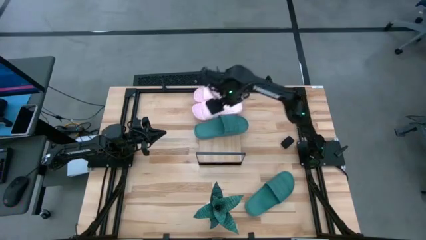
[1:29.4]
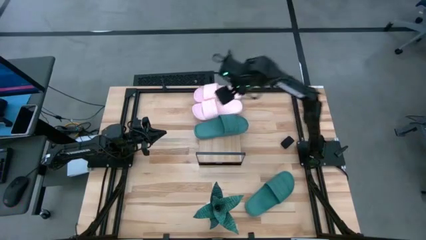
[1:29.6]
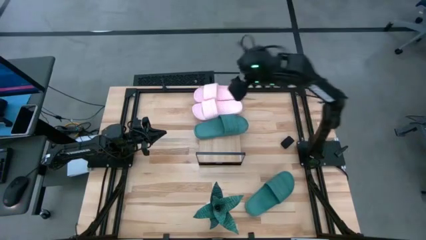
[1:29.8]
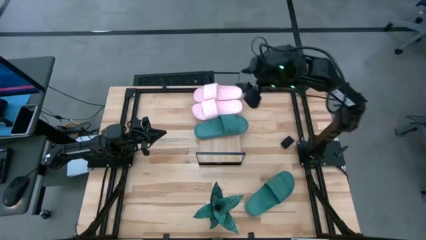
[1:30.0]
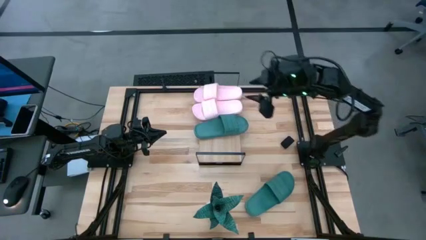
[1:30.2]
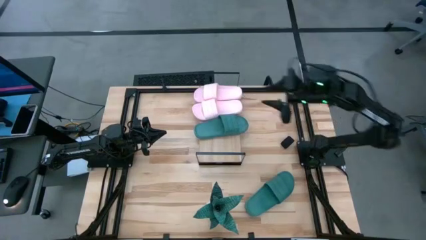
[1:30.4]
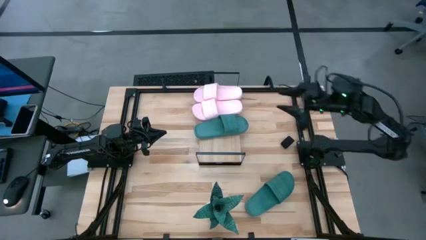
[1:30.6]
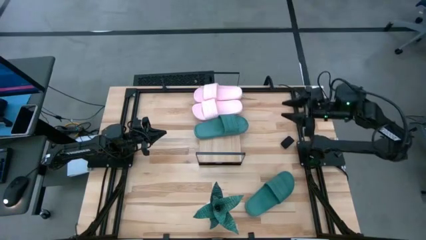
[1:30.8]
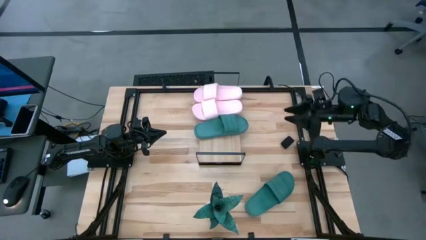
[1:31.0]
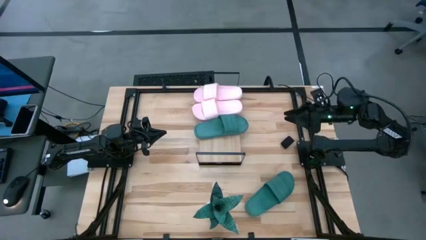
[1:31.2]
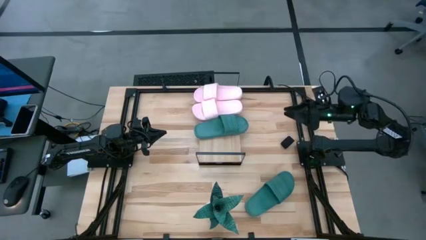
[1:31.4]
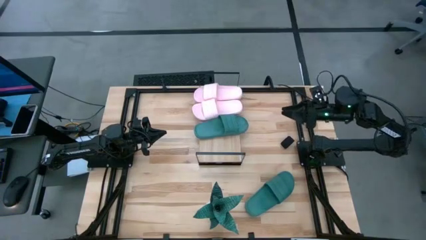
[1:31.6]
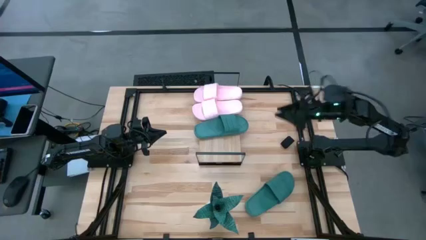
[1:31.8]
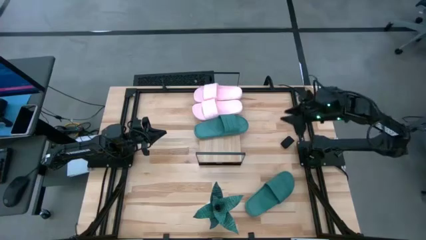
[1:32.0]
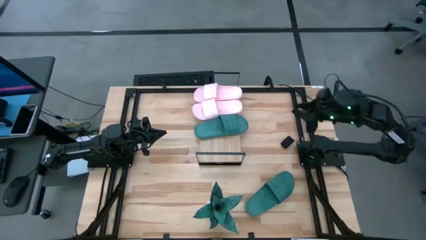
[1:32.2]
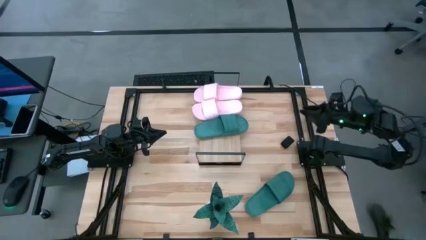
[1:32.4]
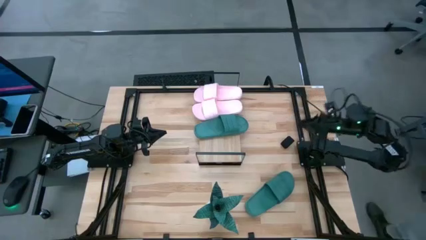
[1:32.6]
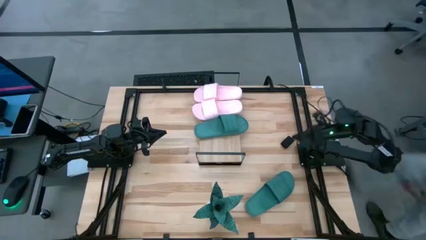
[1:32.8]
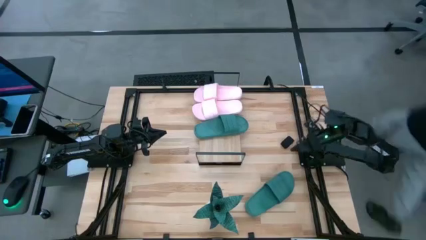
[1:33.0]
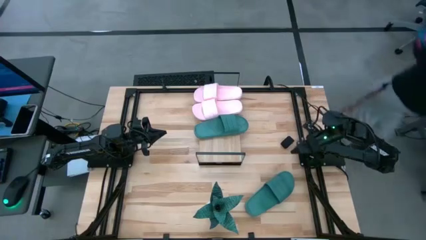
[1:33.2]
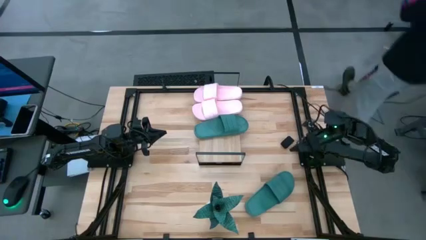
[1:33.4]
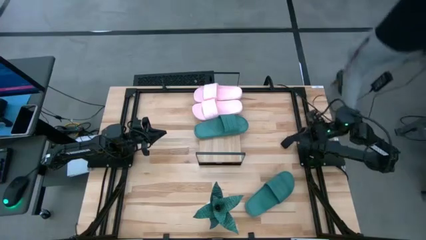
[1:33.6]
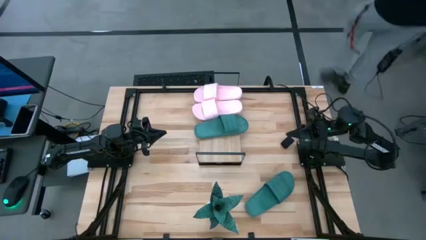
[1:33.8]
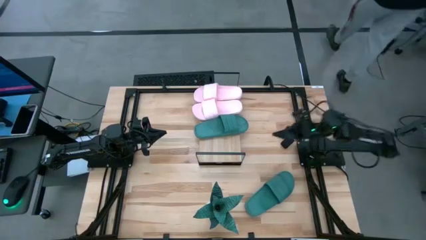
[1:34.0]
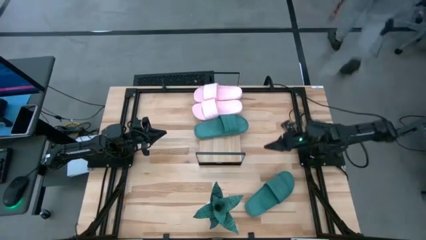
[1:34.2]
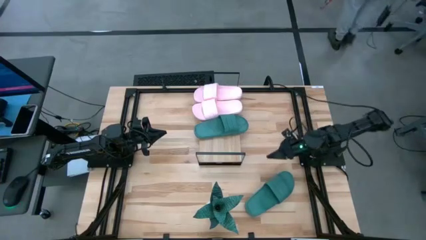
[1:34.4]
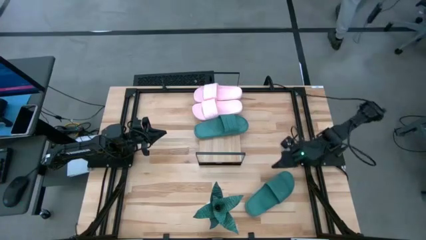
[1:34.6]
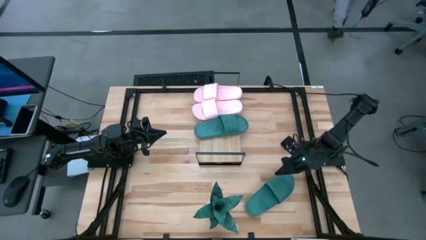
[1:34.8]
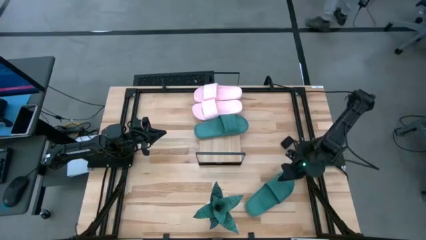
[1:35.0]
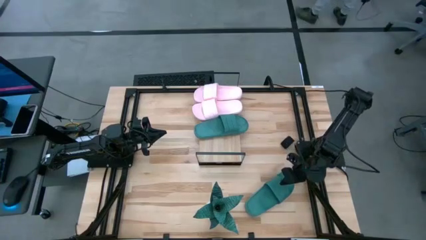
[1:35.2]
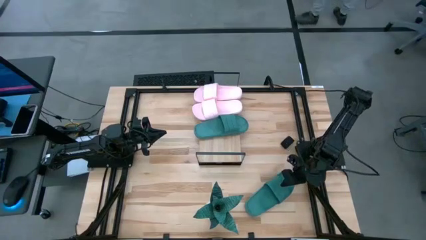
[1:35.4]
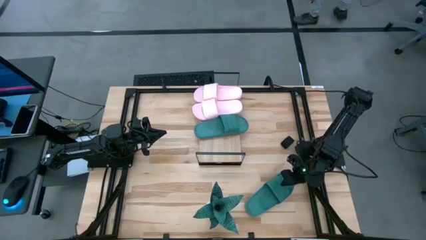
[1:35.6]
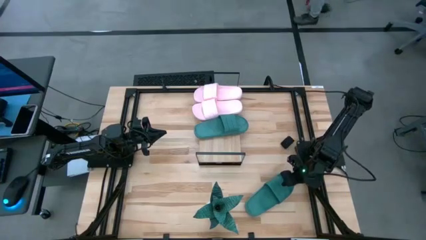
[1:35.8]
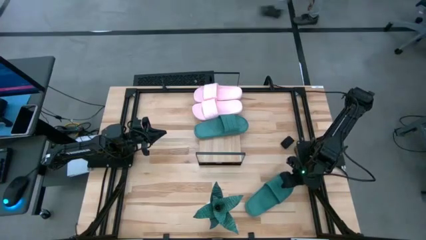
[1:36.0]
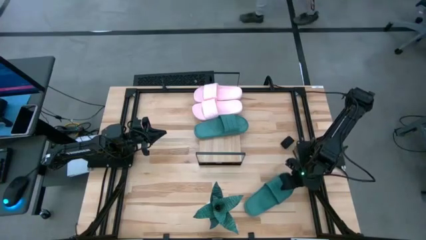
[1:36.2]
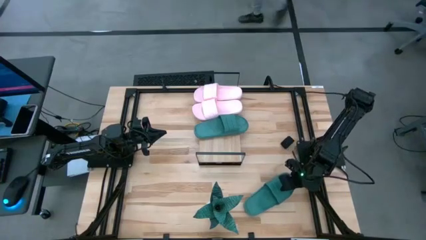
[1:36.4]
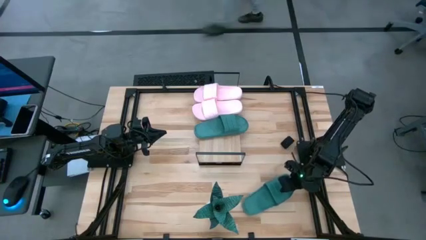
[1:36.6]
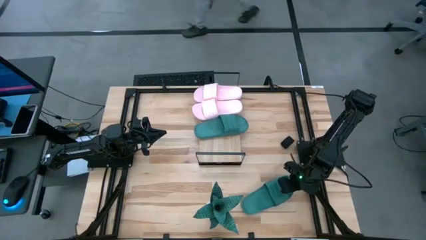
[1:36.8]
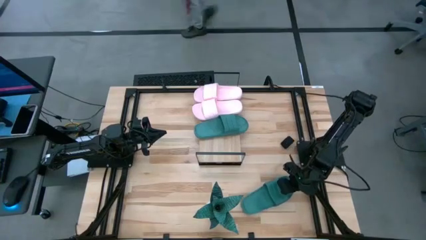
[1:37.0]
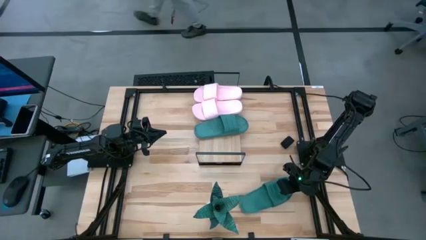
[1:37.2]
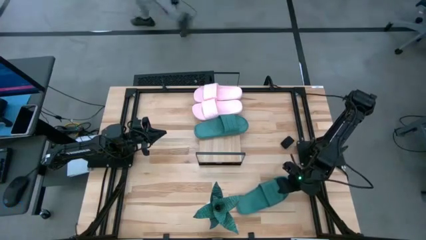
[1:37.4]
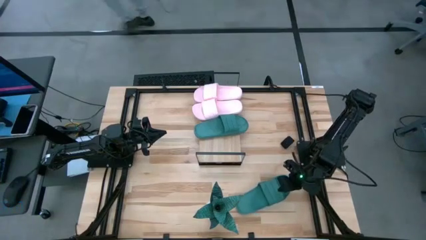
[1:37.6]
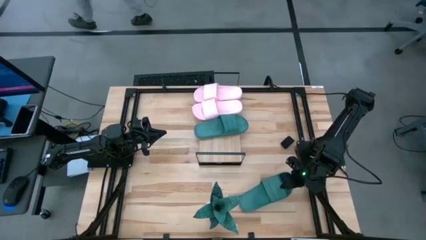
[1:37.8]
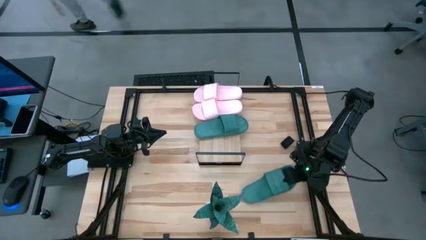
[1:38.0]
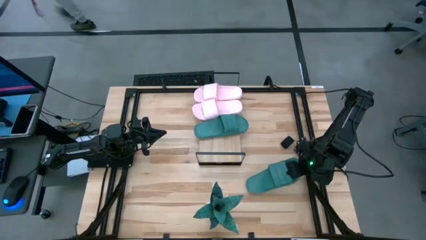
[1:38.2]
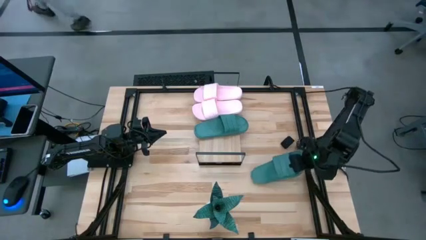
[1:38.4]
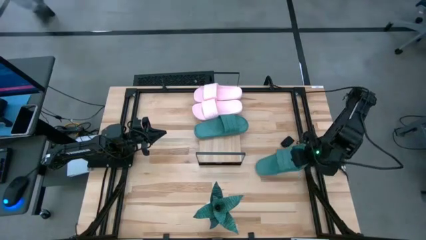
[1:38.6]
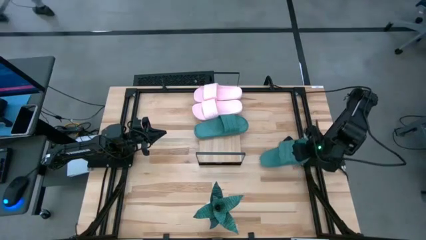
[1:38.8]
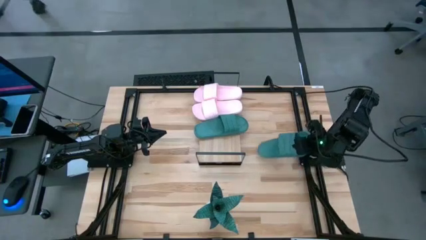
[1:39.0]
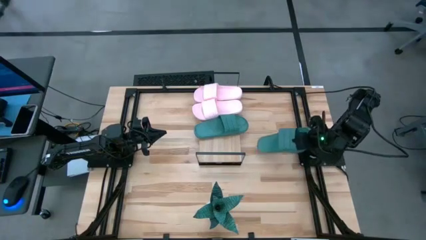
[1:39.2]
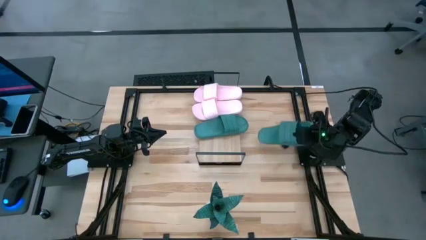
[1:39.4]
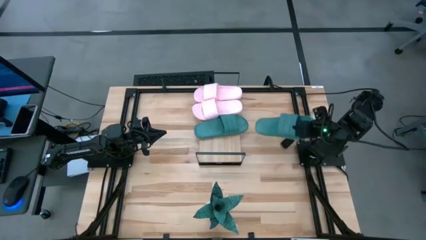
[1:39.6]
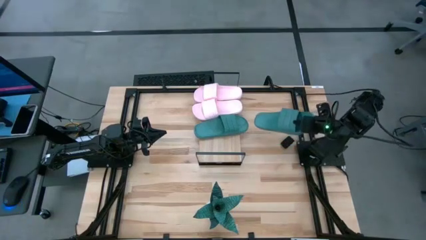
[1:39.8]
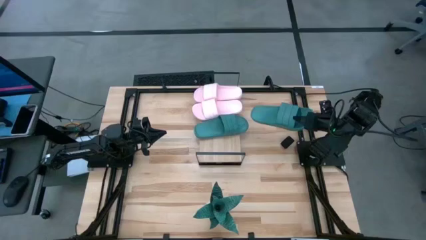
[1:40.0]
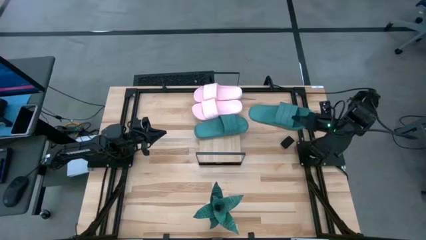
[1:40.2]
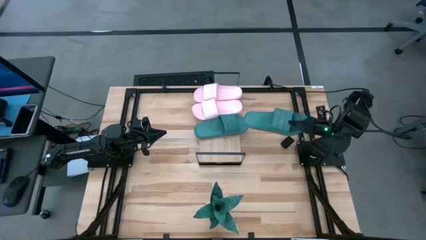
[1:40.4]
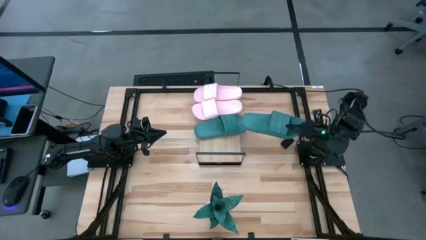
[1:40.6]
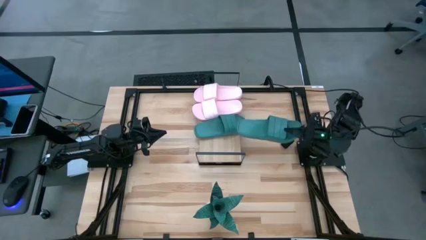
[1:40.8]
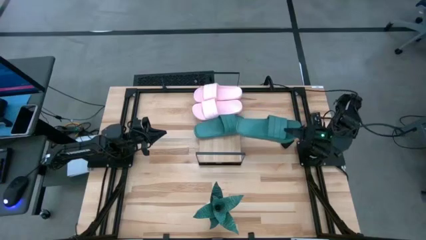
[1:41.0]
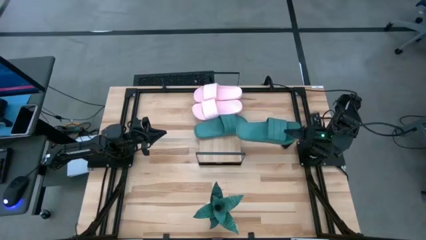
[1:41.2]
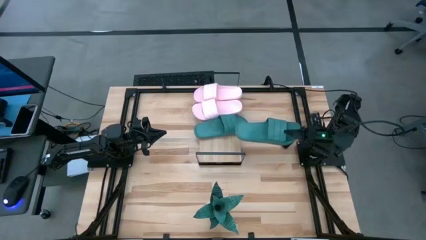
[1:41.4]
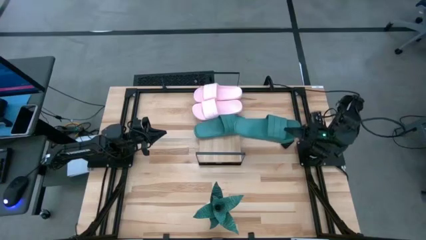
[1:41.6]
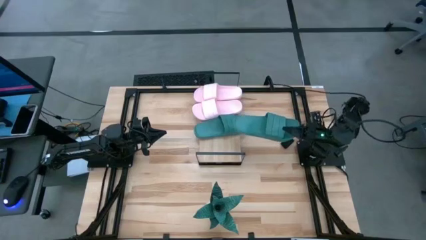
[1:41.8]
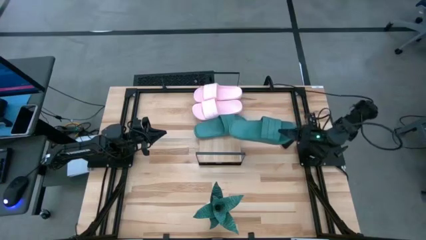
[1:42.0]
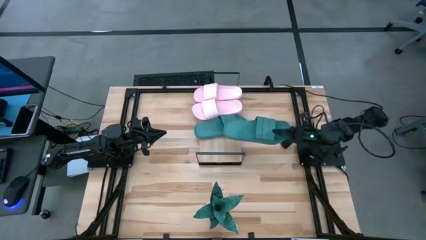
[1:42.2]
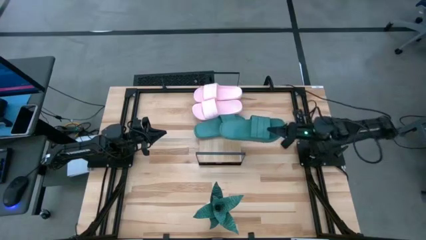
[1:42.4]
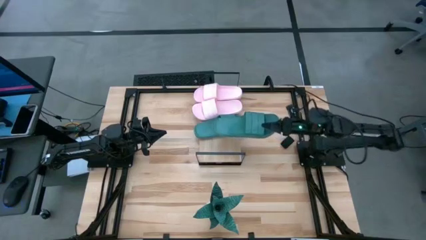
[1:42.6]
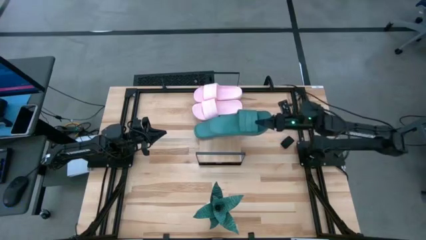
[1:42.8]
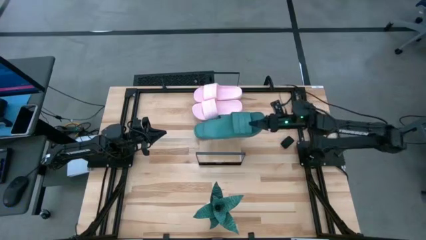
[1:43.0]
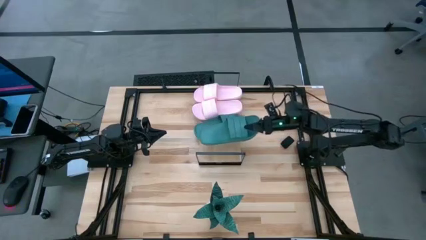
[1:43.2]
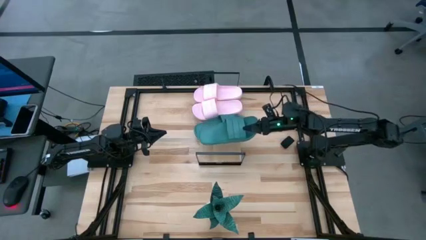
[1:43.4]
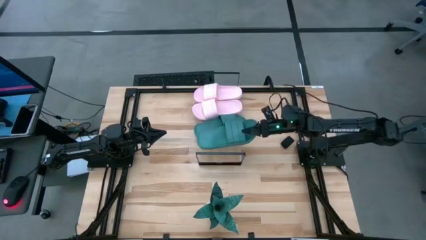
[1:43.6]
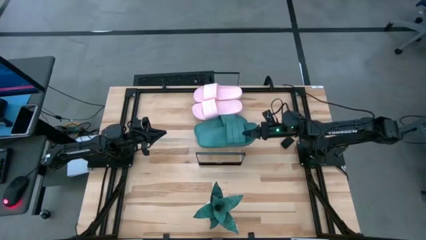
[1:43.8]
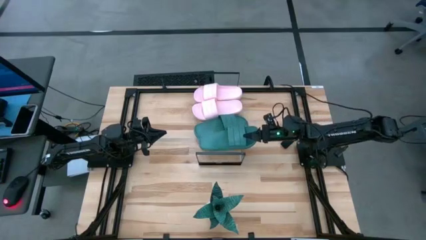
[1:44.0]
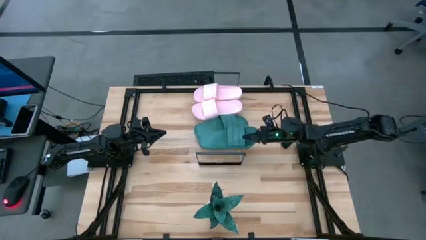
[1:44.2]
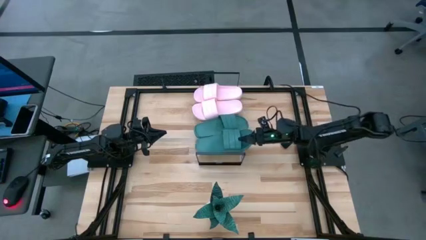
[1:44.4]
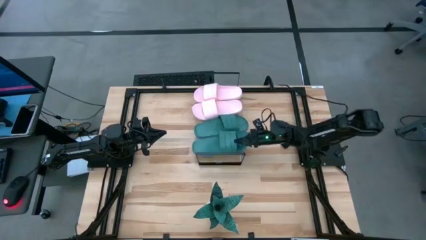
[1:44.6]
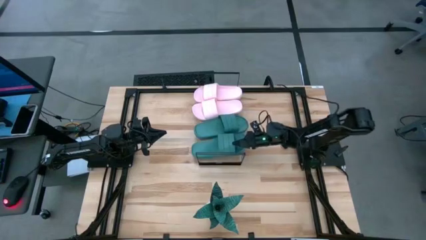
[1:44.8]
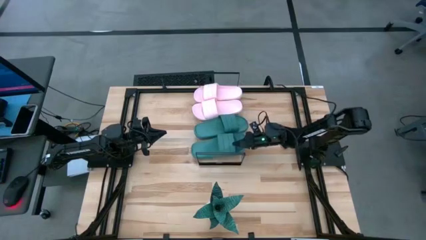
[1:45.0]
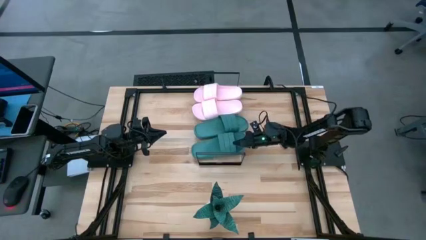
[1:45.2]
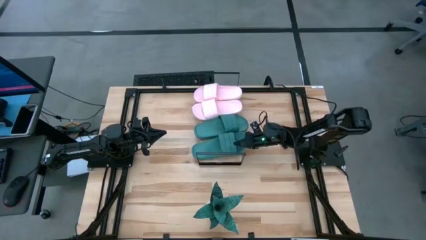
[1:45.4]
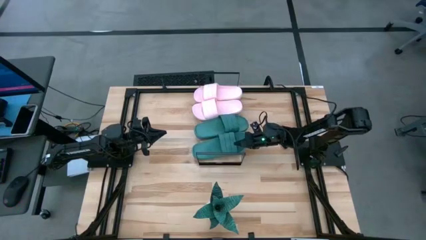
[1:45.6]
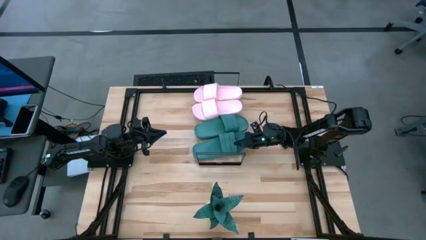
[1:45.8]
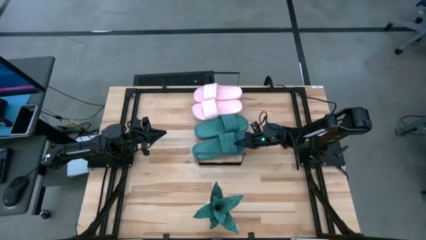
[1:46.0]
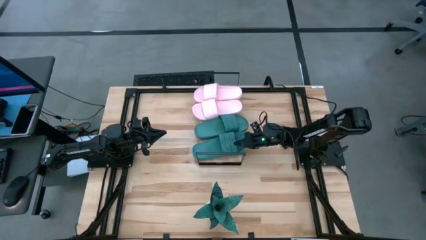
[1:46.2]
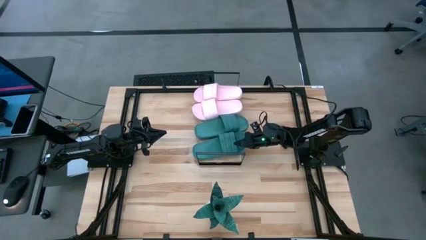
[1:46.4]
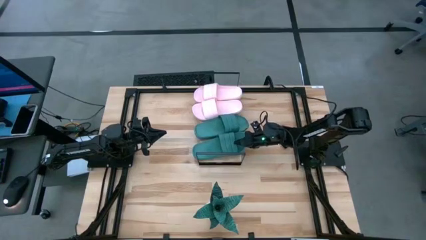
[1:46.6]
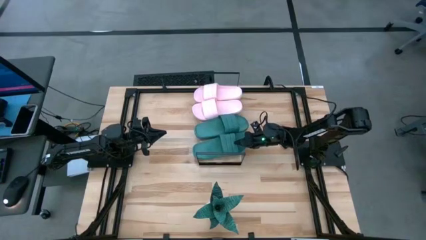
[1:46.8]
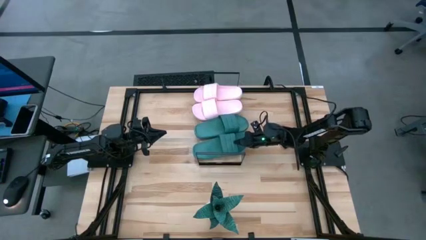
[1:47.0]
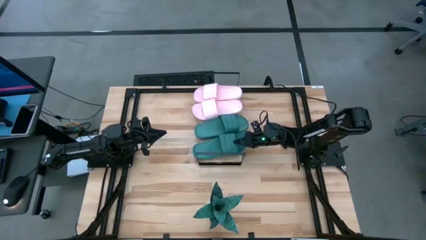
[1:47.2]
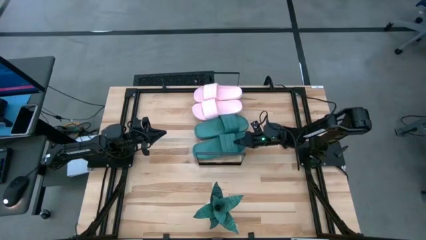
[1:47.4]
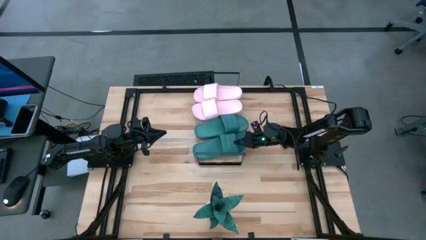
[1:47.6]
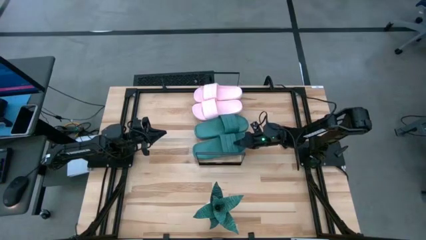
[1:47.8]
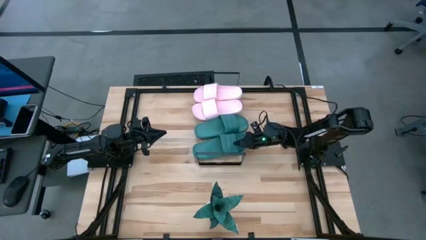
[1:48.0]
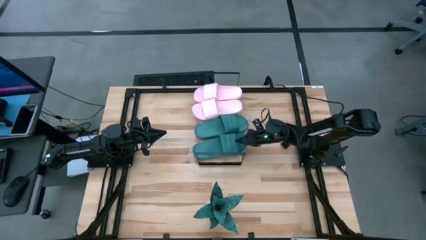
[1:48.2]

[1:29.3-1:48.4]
Task: Pick and place slides into the shelf
Put the green slipper on the shelf
